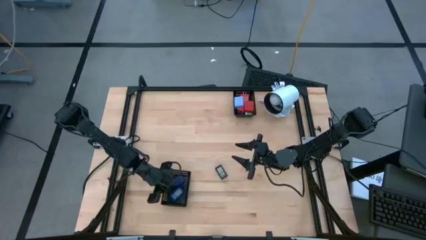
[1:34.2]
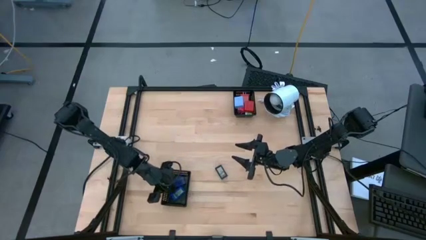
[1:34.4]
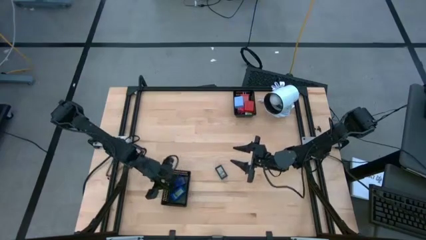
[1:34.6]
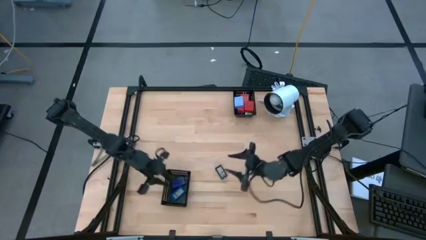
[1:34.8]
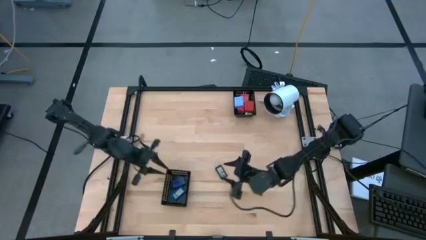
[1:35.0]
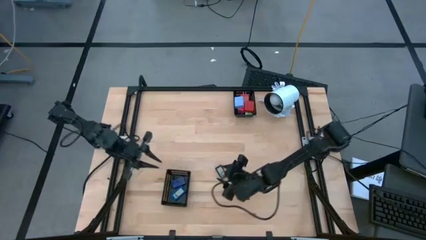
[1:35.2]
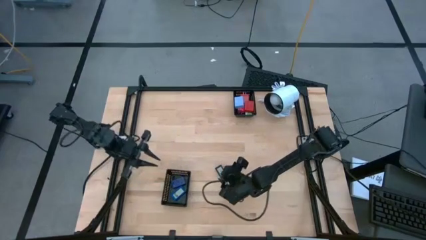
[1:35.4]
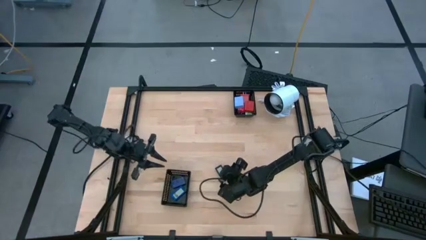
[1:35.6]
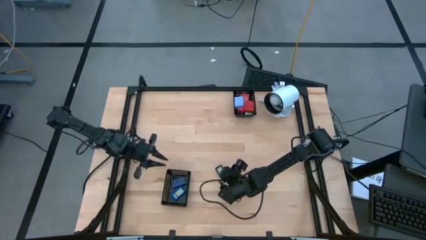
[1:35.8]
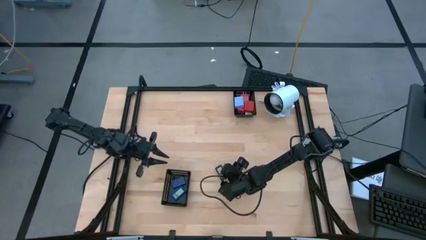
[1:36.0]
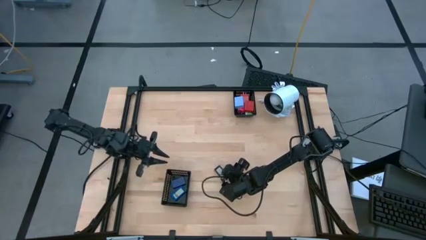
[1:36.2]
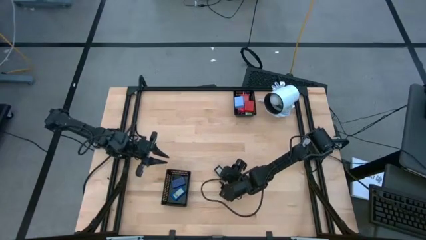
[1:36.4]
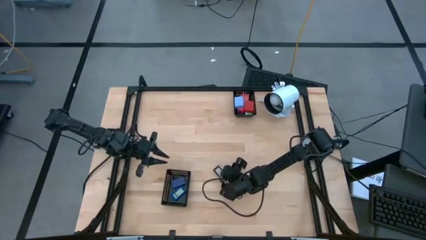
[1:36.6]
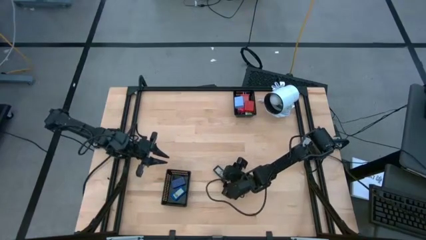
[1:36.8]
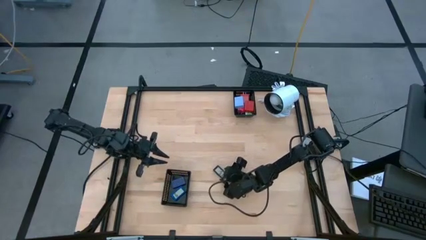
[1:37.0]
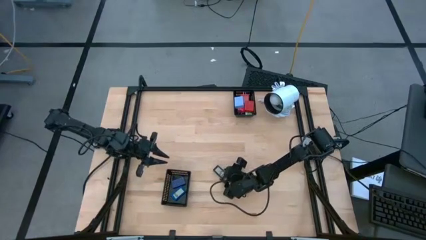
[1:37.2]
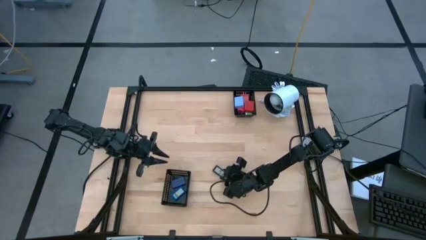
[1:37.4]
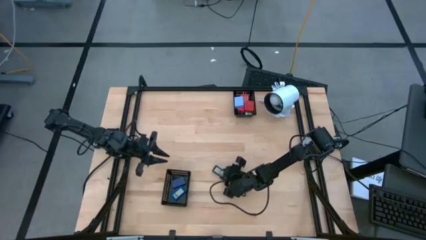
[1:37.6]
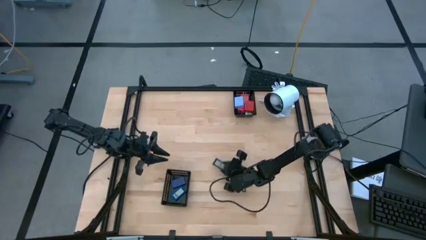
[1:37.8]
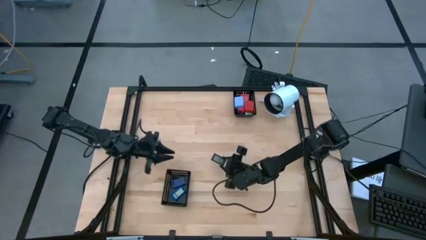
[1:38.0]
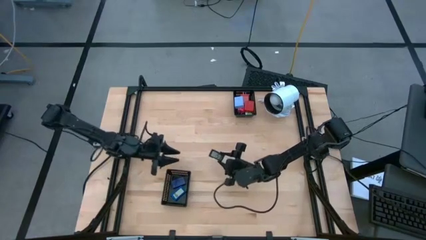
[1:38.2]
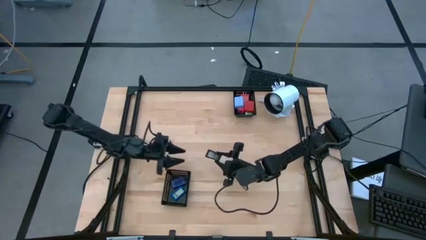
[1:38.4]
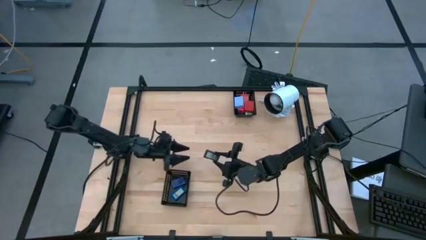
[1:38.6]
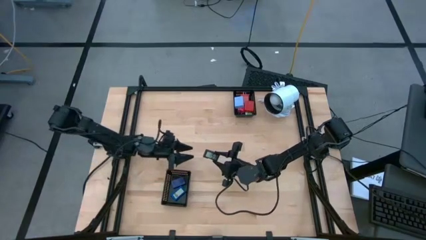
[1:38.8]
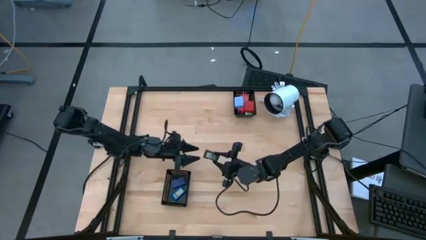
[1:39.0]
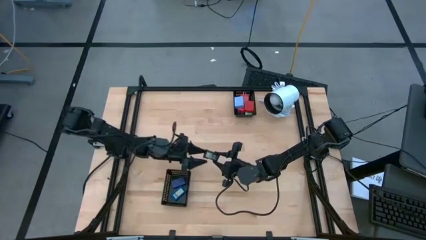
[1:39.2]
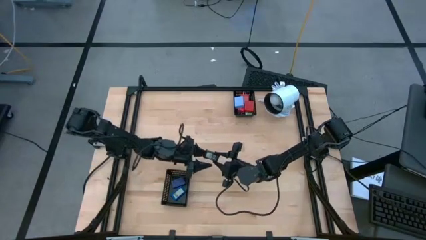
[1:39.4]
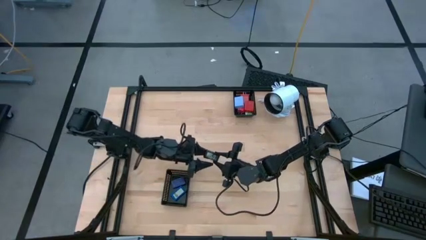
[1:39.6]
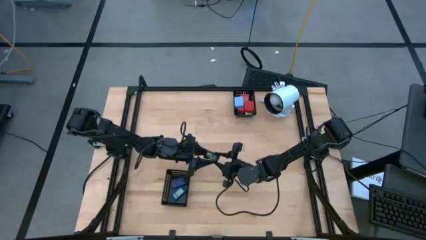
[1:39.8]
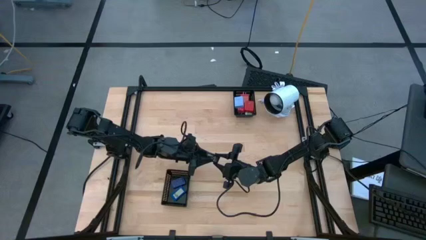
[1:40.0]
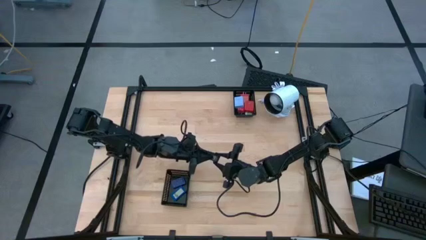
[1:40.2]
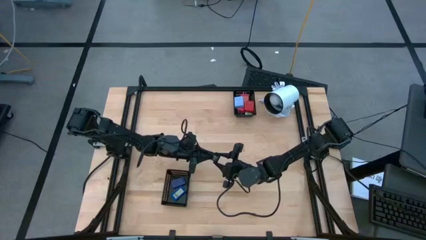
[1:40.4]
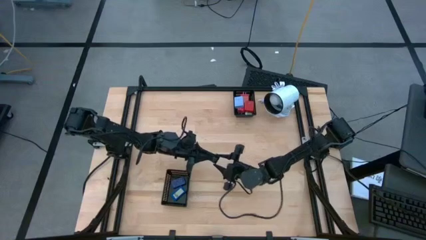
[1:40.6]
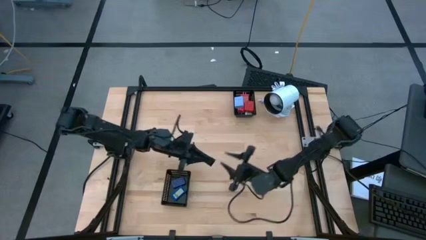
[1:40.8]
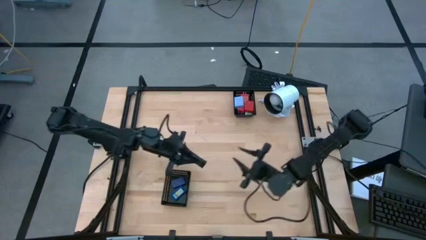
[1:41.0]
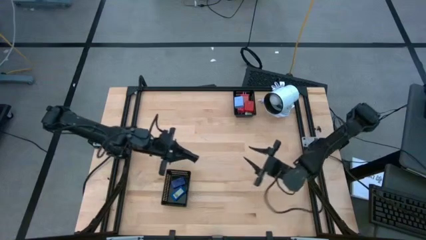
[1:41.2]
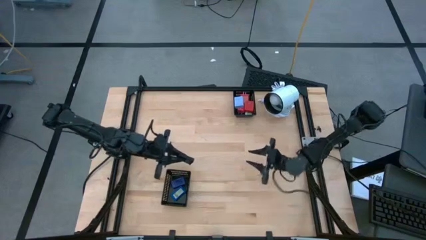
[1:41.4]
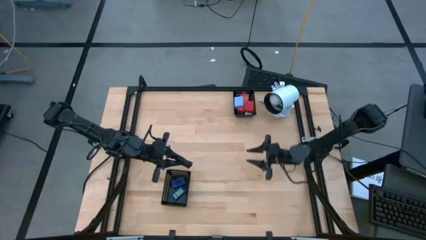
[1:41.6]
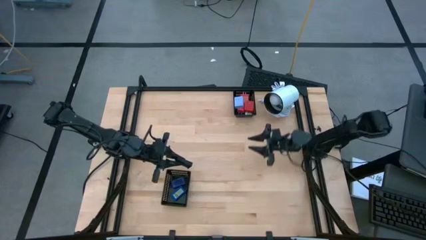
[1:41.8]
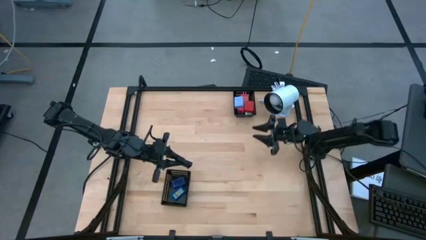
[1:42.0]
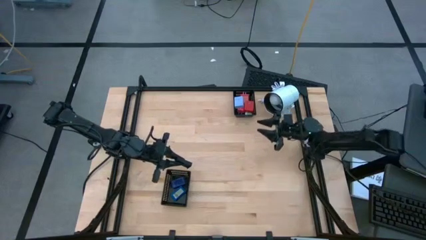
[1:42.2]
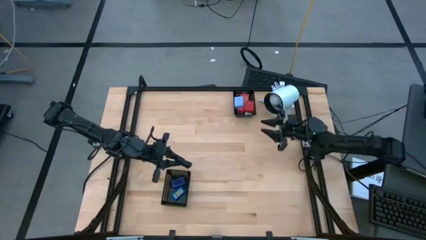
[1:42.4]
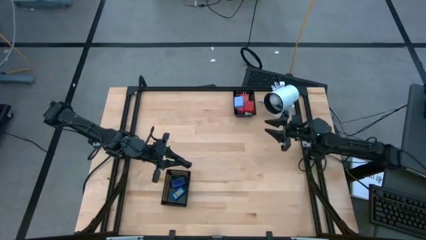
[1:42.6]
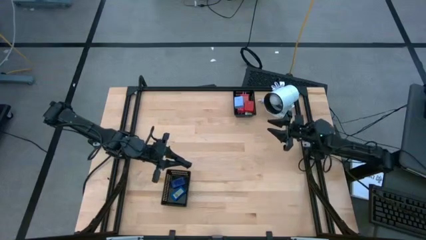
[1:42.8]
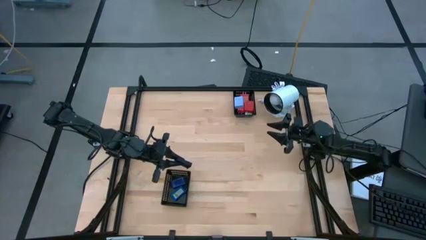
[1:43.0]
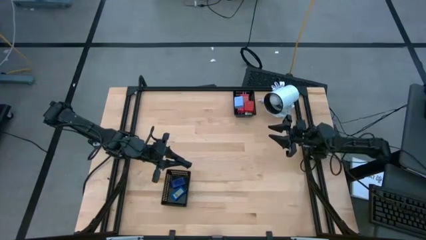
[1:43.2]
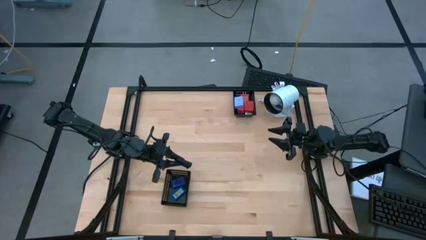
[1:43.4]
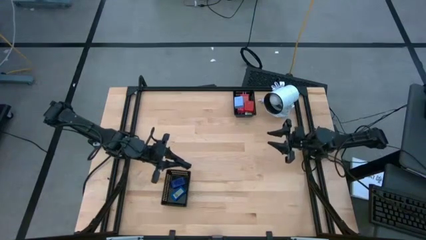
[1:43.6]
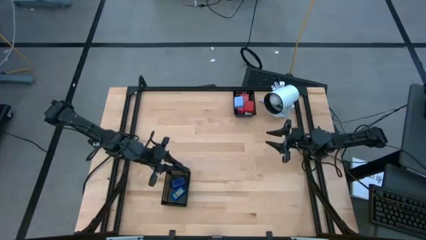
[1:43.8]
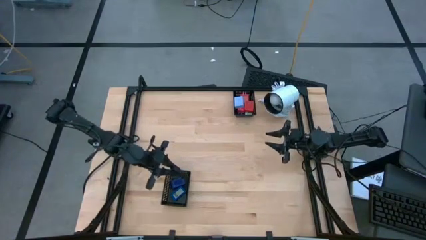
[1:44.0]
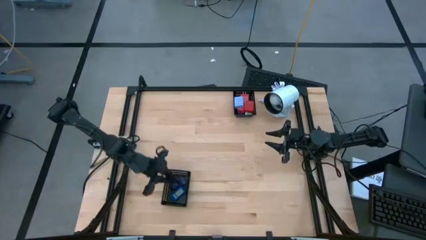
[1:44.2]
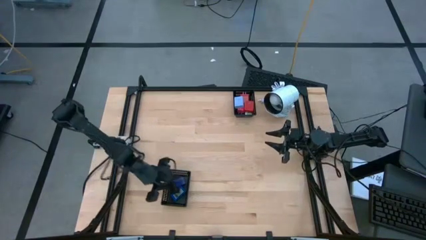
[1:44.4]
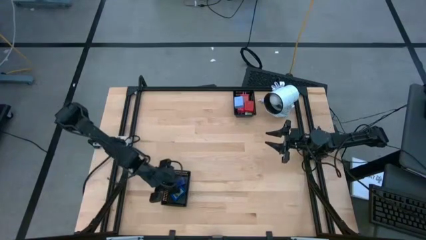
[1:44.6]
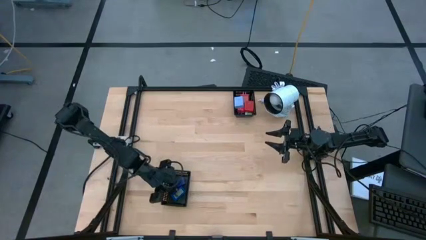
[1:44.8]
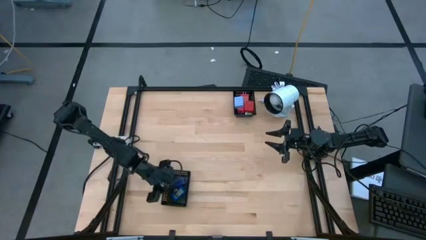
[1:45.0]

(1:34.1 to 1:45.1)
Task: Pick & Place Office items
Put the black digital clock into the bottom black basket

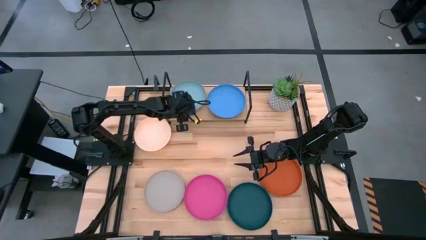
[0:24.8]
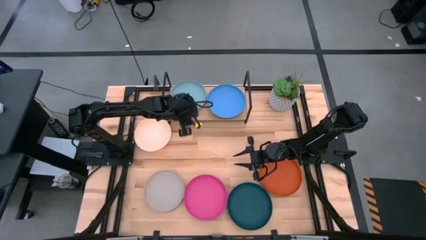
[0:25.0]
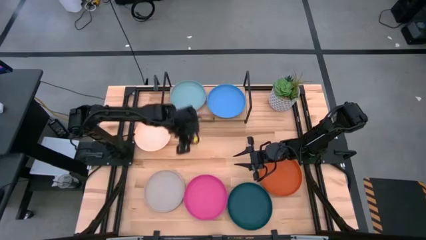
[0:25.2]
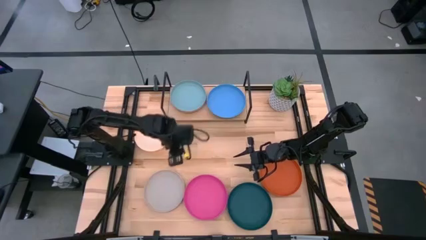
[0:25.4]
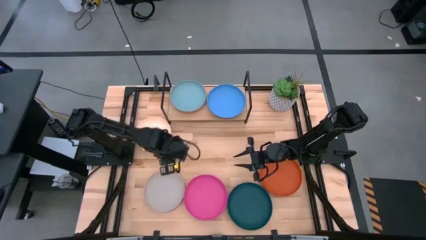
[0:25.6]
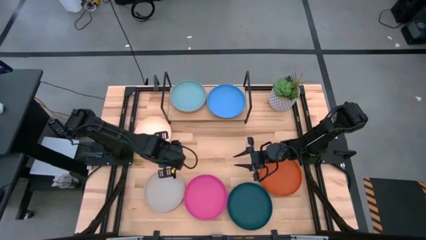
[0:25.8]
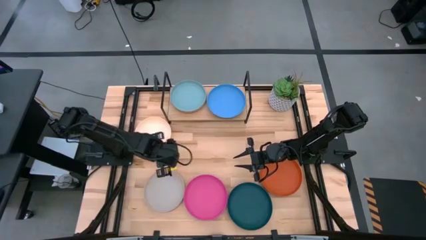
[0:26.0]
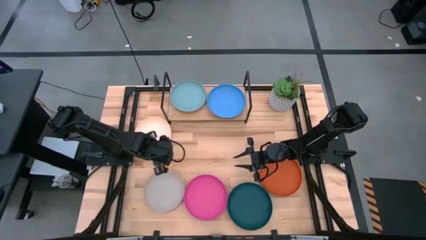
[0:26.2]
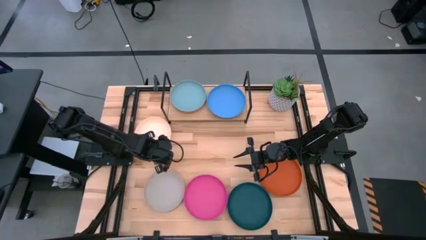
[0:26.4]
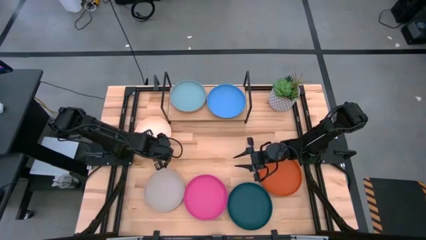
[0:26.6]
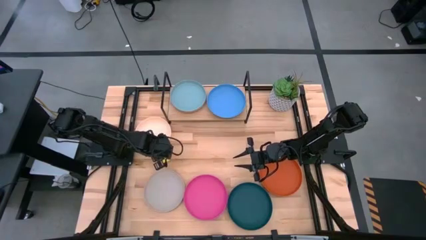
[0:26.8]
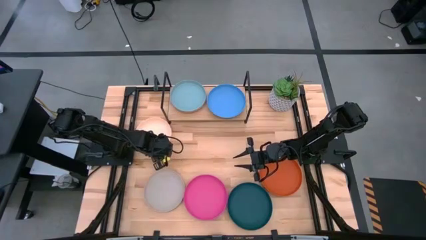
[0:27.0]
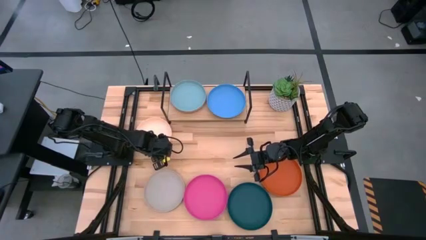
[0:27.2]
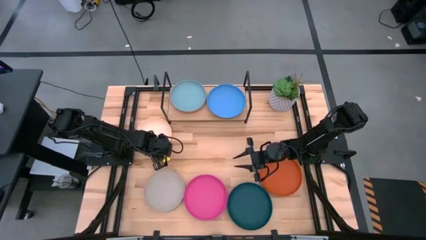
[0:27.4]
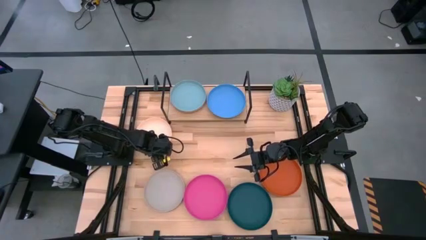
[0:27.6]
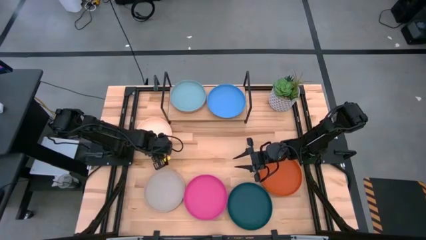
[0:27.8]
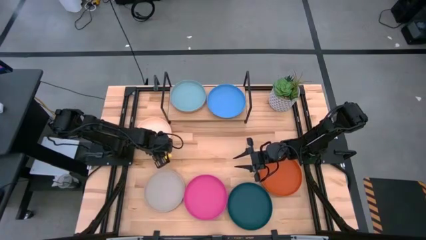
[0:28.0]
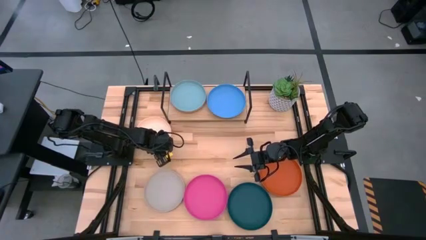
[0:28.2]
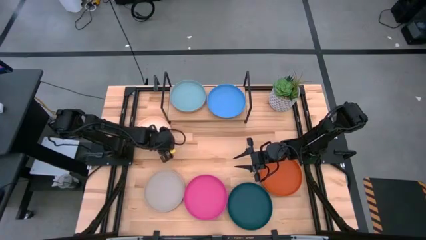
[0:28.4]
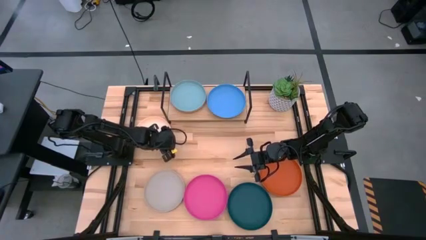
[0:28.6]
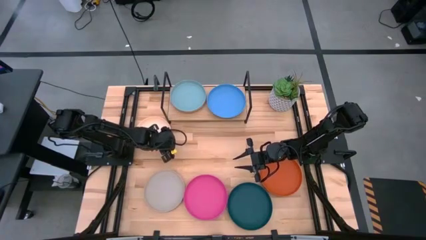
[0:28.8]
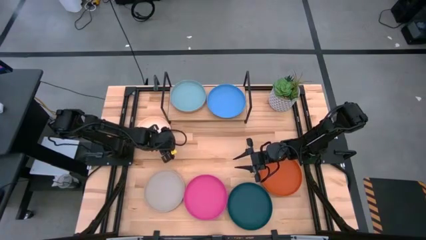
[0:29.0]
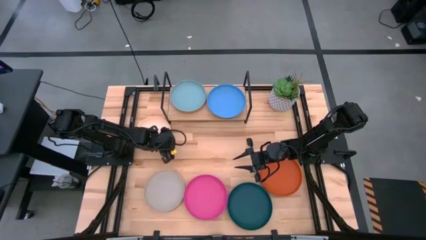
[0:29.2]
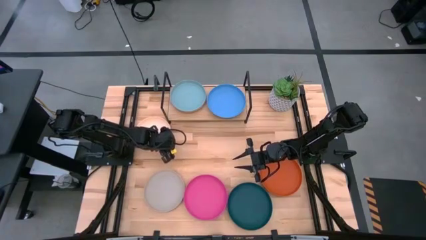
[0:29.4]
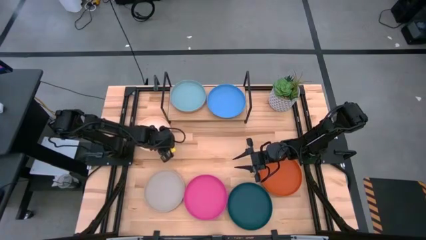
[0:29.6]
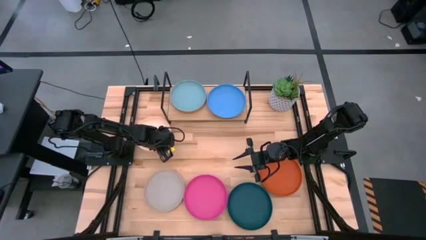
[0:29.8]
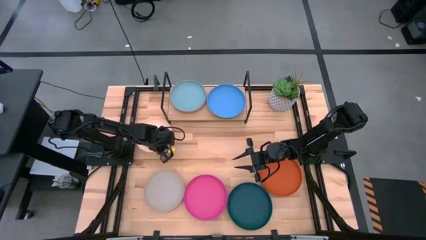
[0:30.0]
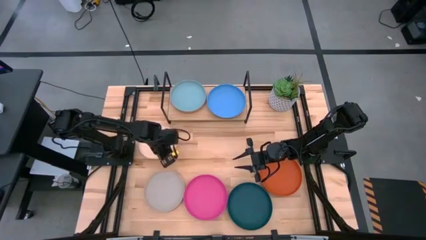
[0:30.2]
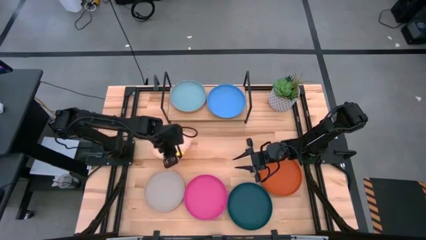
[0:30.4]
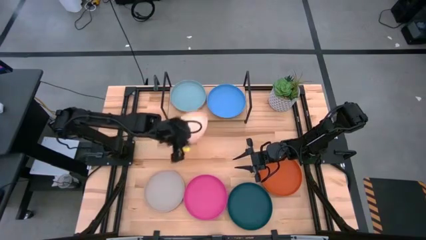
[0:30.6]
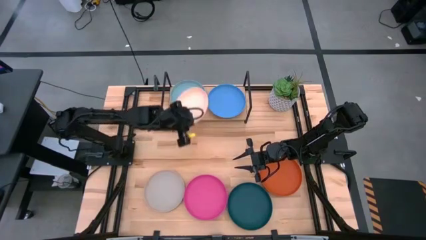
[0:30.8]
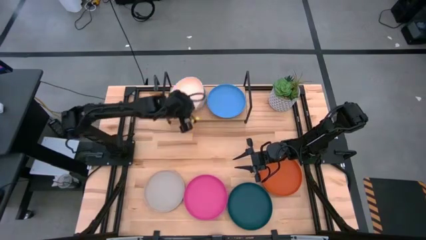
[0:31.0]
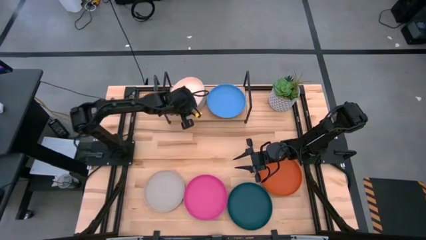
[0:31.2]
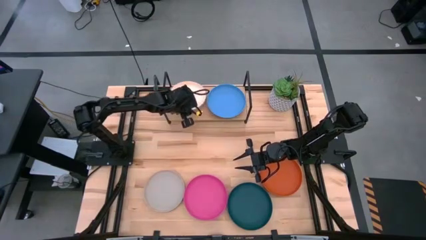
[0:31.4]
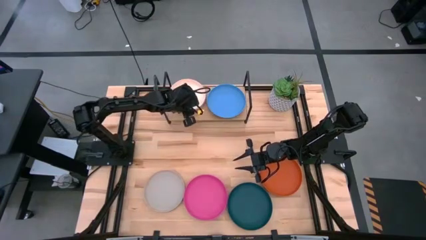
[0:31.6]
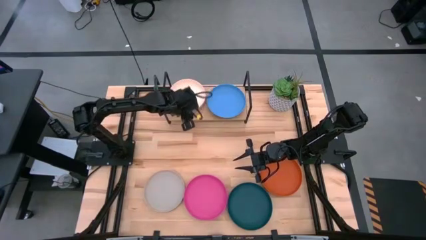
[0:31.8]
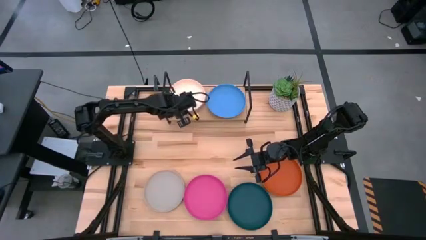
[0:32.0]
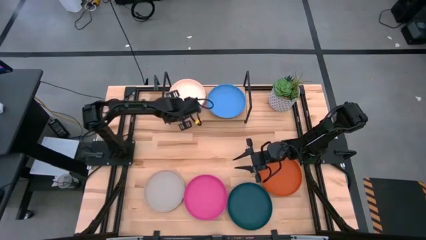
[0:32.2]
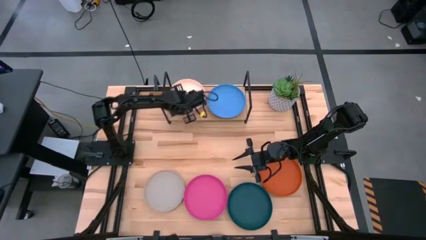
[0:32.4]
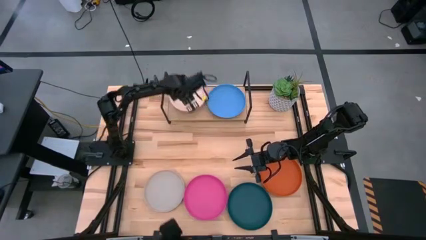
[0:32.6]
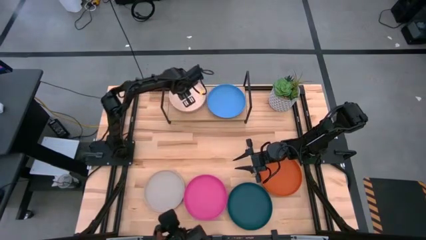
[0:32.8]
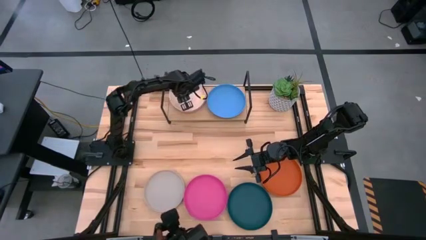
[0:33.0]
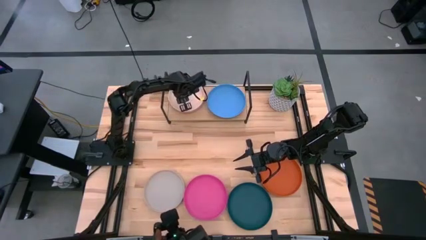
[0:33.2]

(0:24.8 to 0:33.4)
Task: Place and stack plates onto a shelf
Stack the peach plate on top of the light blue plate on the shelf
